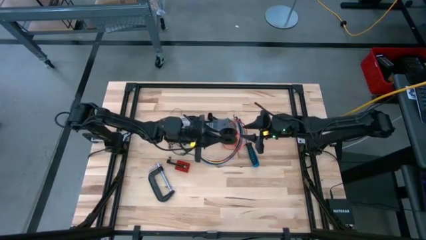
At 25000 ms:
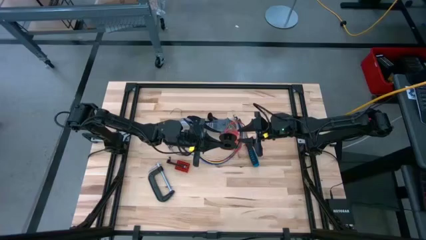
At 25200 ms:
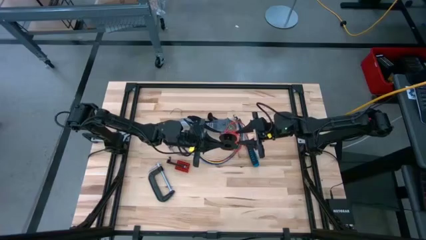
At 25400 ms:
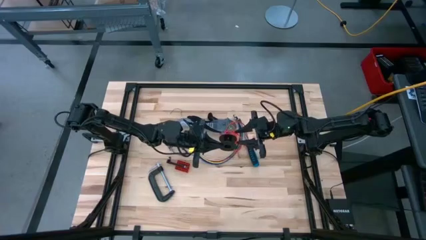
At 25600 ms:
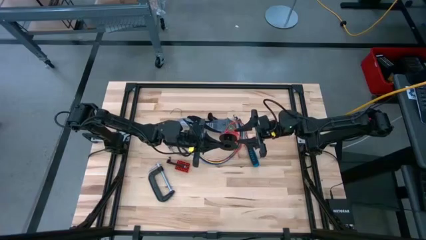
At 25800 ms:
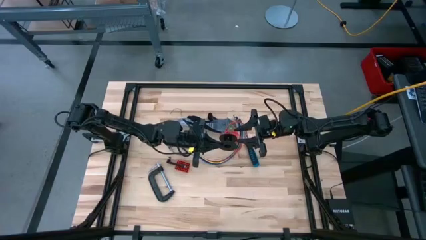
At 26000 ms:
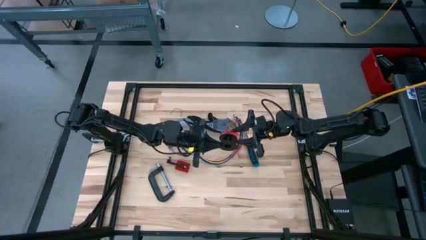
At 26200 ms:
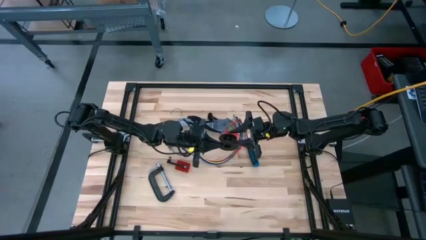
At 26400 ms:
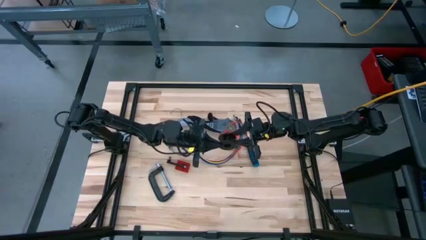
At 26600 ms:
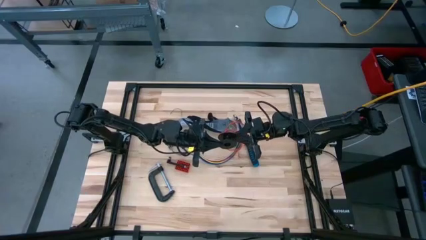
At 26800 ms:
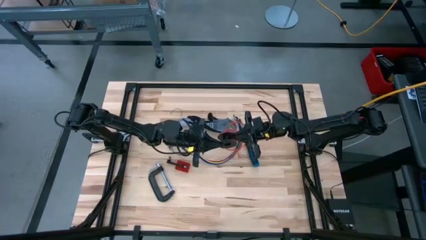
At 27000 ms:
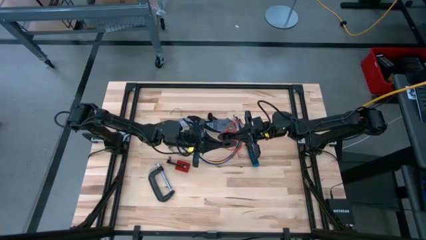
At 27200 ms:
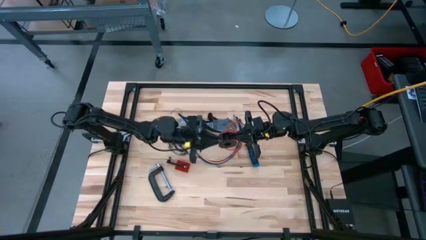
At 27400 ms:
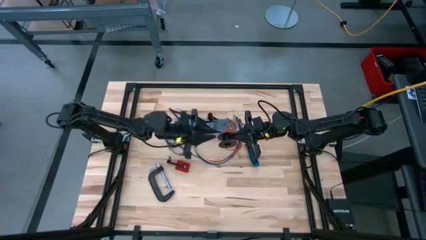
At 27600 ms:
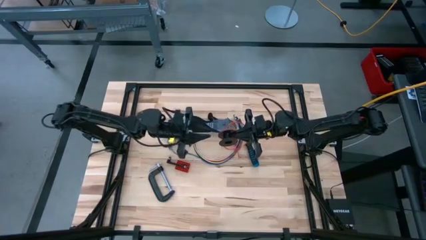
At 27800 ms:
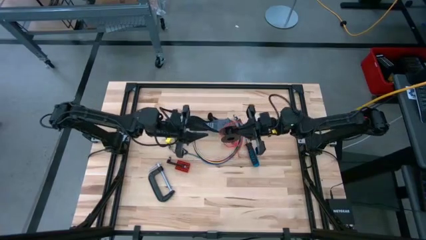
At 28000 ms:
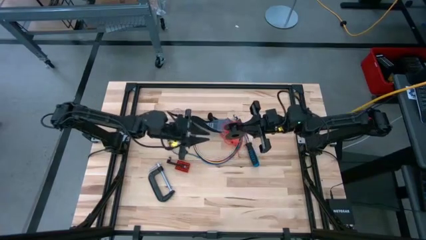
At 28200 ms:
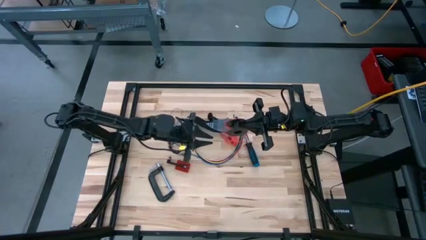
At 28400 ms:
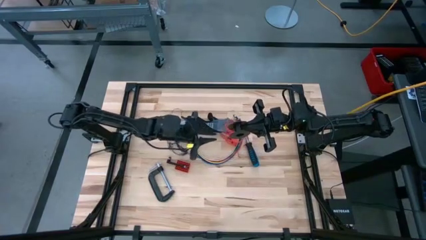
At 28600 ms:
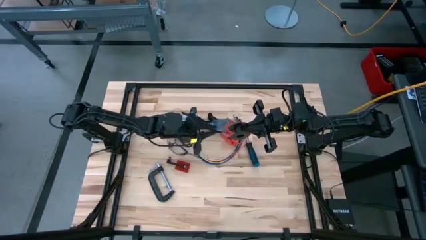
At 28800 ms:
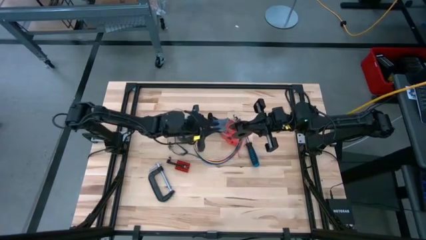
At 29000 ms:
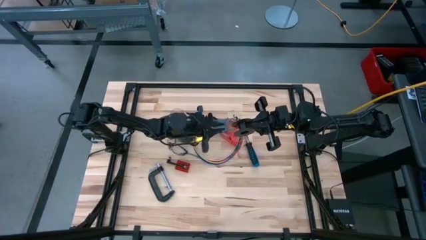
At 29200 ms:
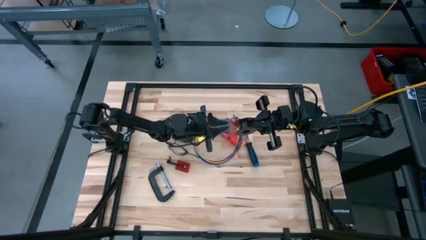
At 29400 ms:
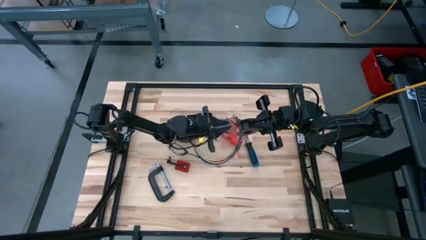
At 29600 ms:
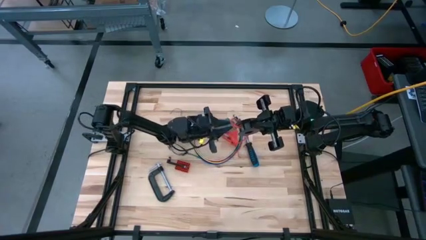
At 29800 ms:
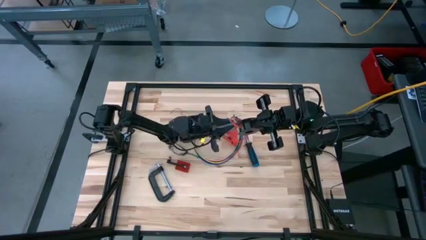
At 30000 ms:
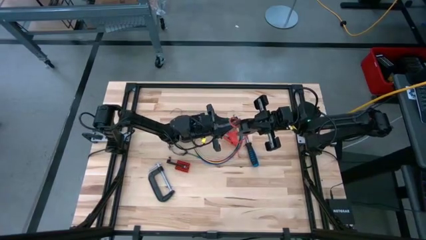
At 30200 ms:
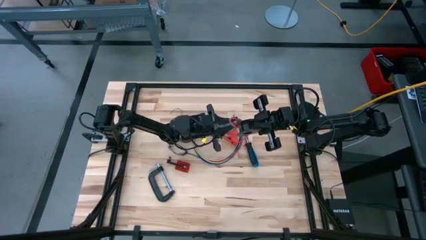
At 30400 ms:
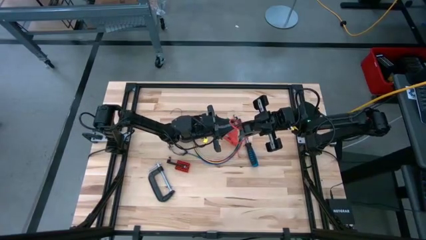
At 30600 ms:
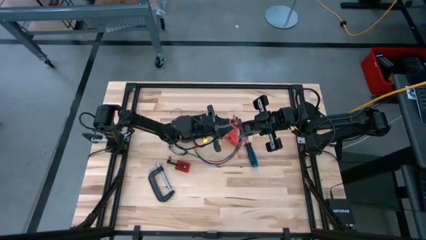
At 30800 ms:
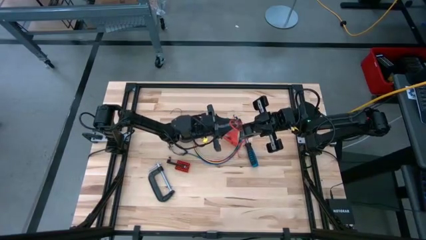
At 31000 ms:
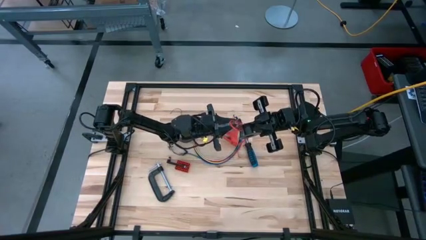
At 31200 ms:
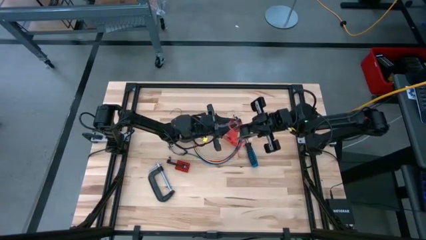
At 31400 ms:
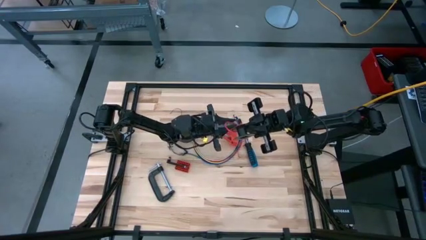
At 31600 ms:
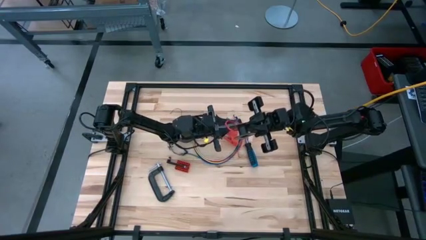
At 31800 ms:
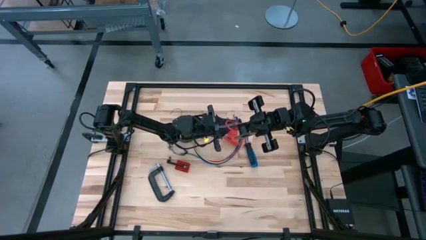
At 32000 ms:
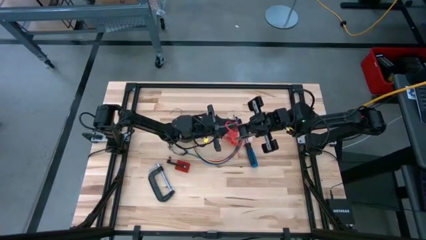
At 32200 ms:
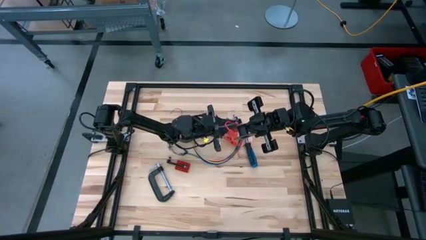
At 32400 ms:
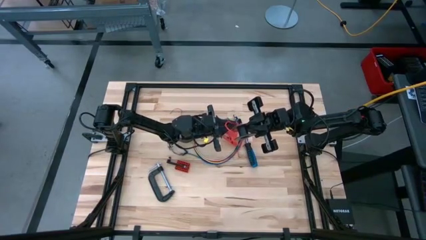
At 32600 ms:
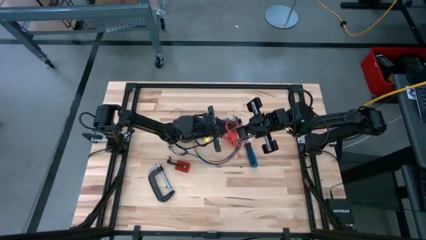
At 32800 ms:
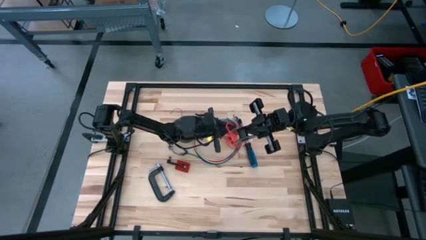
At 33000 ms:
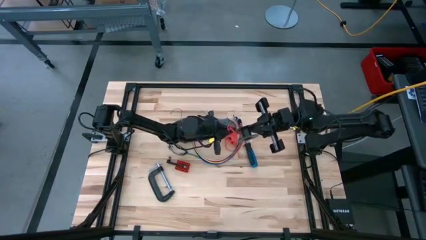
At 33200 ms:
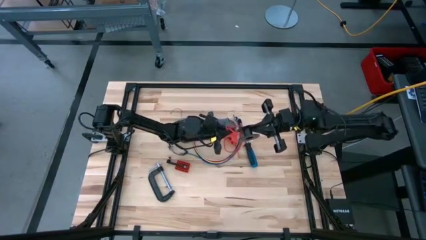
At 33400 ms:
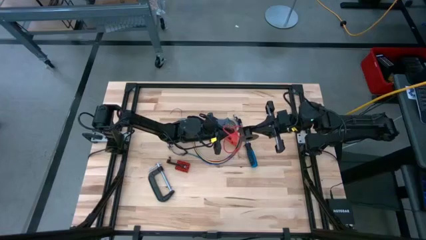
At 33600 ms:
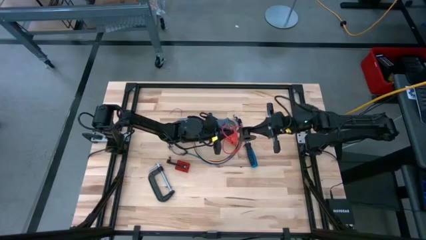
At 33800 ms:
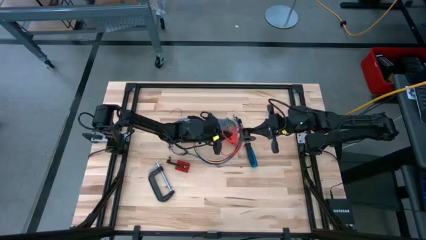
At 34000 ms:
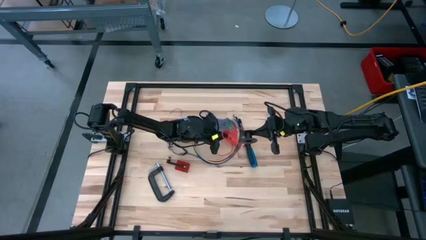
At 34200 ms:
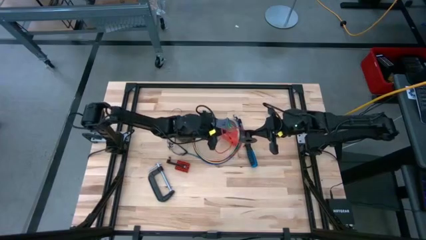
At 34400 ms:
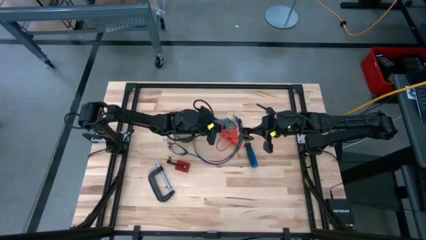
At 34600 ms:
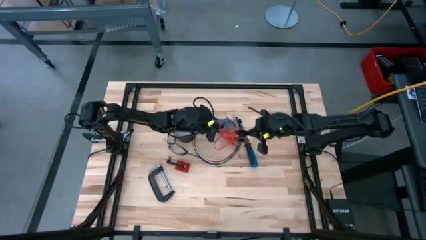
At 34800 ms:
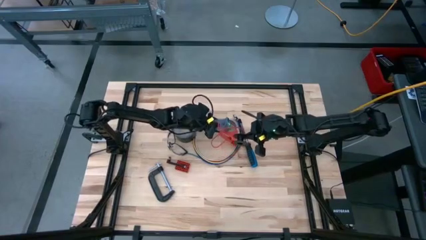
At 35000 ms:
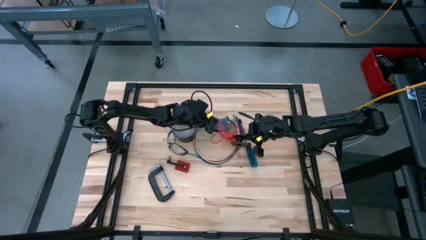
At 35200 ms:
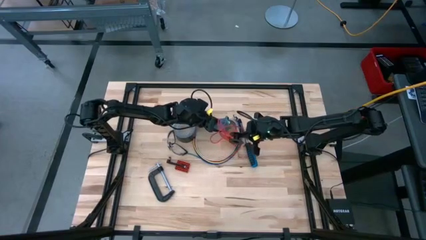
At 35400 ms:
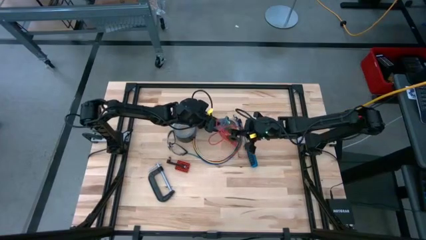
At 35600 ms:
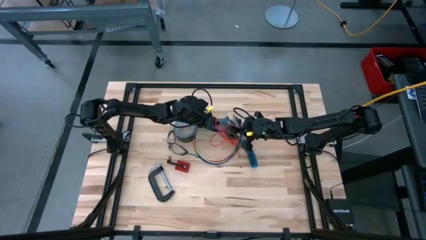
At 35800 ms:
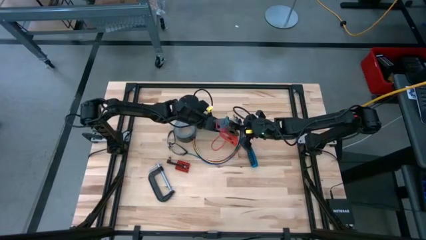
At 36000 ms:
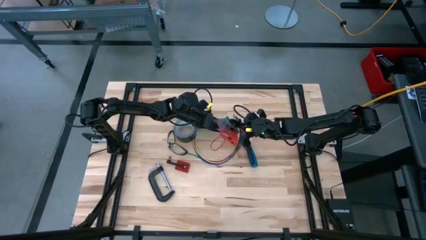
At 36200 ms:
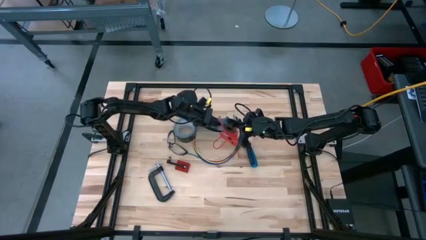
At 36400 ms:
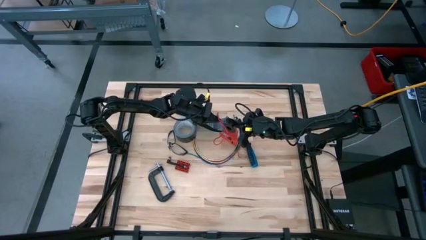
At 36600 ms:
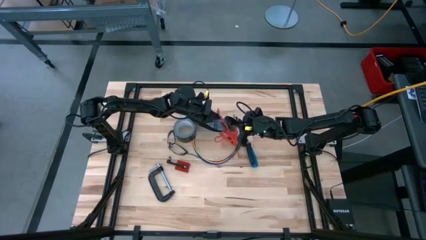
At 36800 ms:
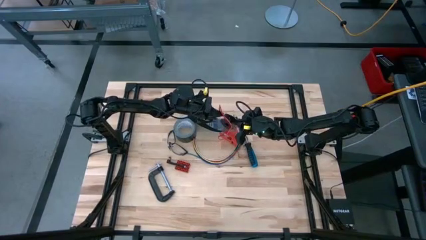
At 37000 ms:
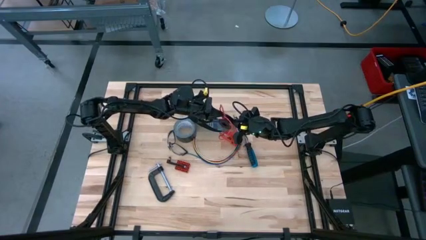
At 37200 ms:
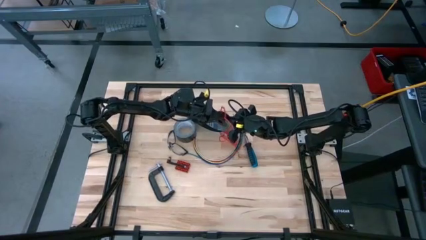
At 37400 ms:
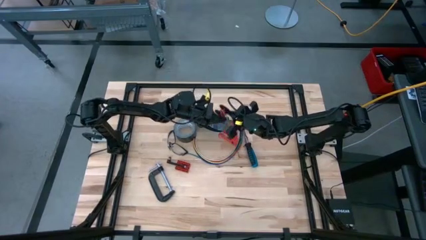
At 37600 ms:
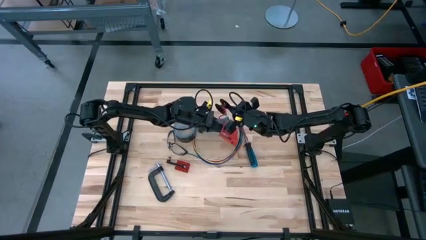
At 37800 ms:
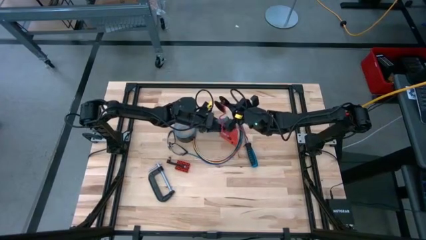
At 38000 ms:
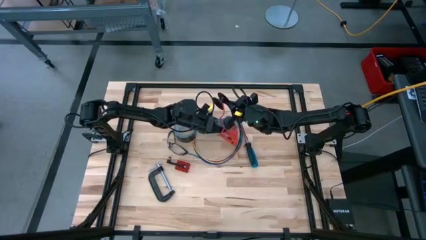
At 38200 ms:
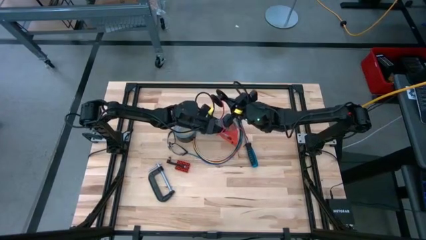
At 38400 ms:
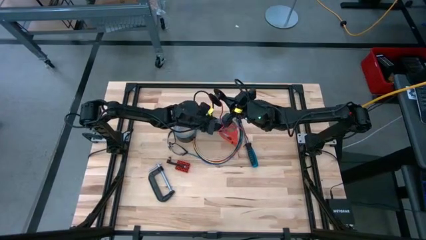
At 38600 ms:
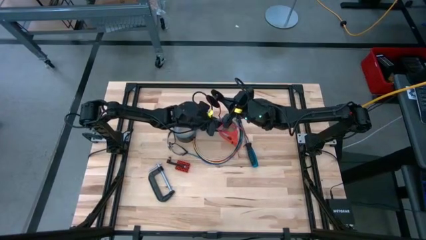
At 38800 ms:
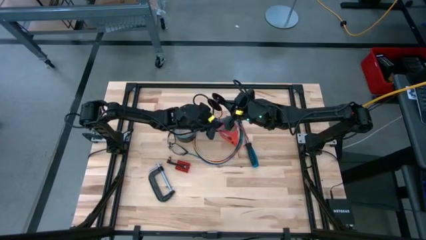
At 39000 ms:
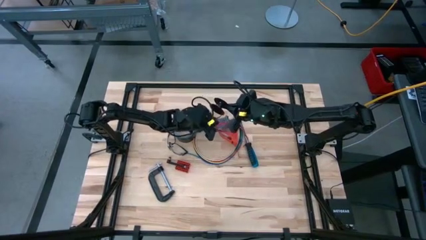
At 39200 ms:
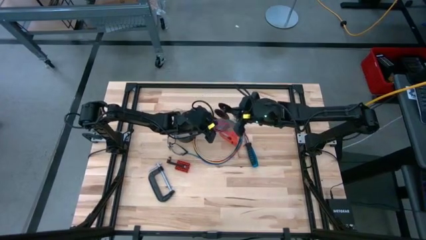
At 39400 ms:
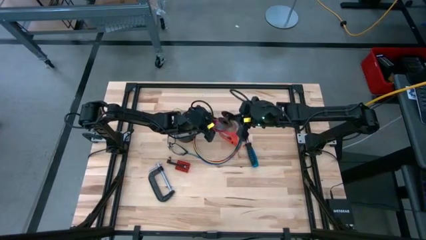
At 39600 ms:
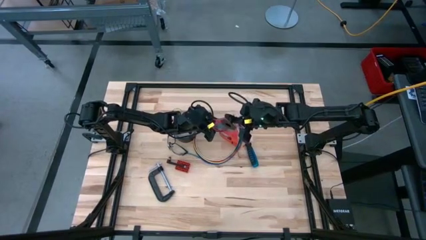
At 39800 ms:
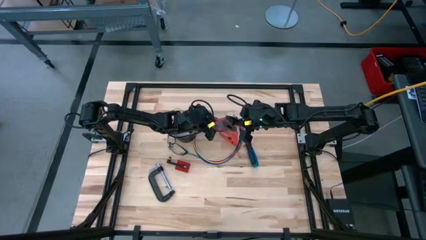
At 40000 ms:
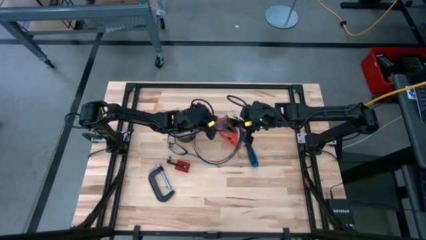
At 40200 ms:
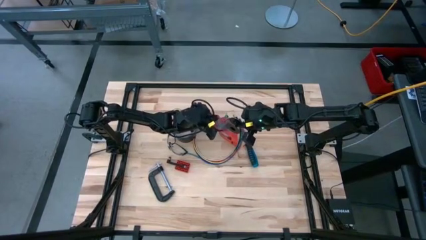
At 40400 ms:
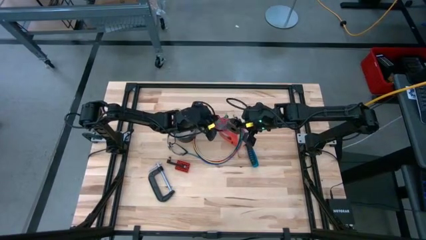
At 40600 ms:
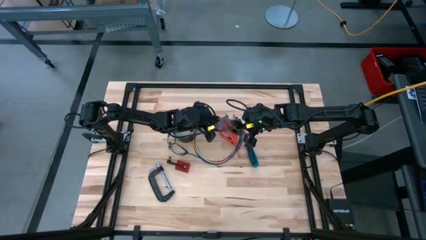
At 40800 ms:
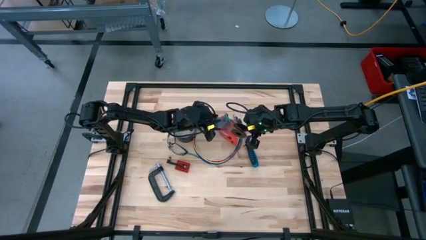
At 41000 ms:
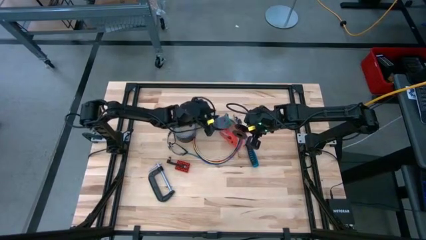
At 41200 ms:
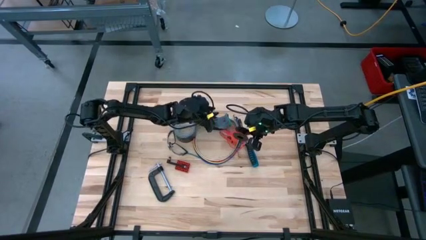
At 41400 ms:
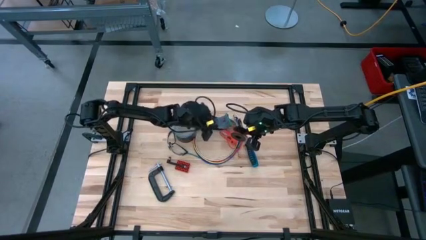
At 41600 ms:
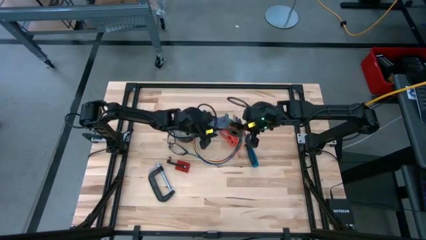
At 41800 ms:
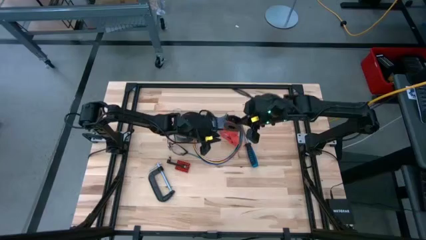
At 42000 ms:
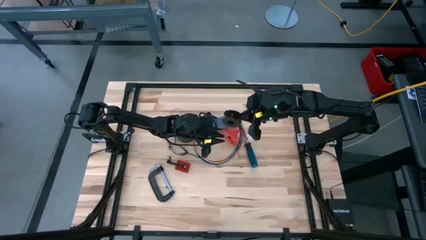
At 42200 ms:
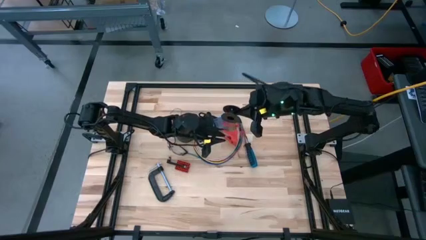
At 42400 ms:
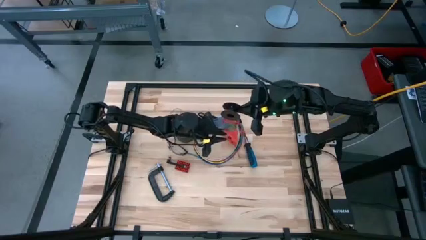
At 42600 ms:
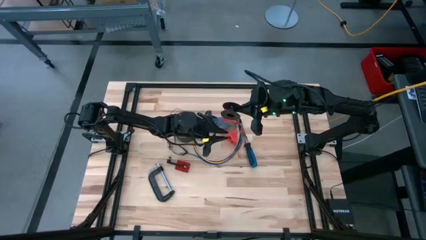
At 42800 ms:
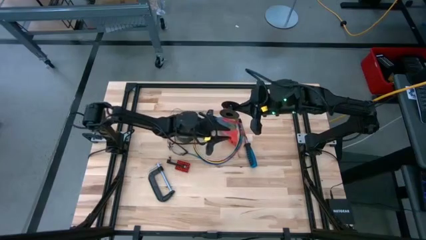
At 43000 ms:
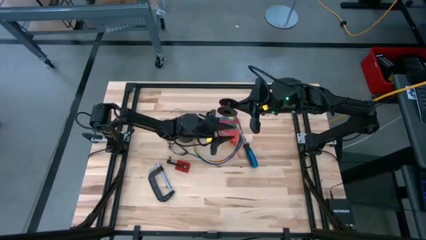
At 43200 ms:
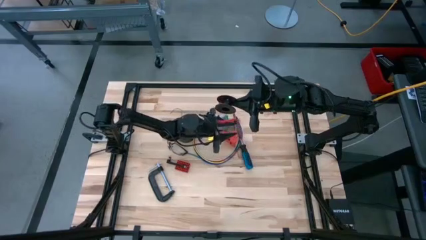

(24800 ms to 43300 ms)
Task: Coil cords
Coil the red wire cable onto the black spool
